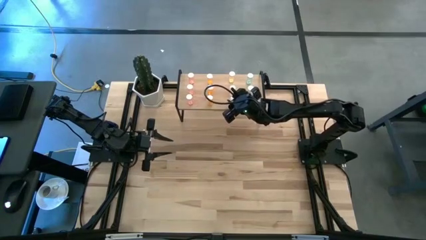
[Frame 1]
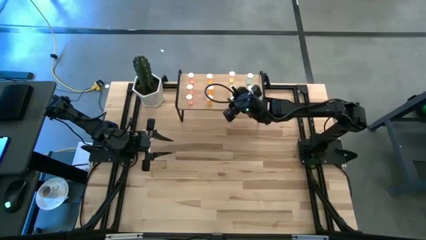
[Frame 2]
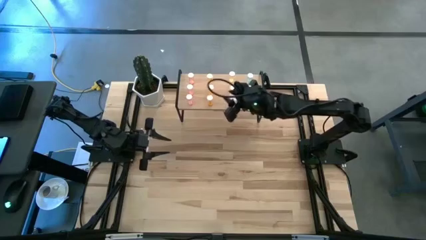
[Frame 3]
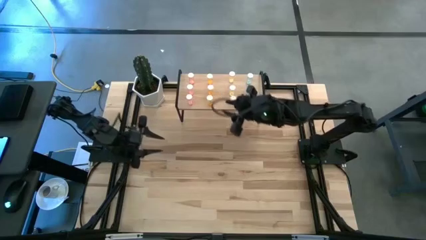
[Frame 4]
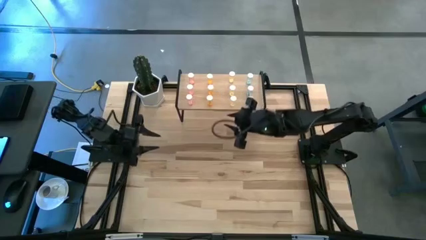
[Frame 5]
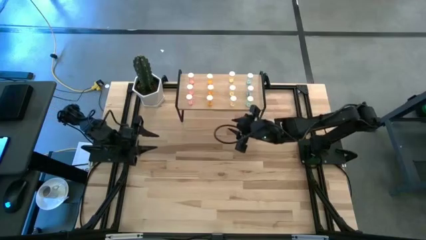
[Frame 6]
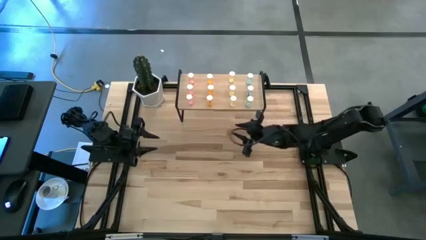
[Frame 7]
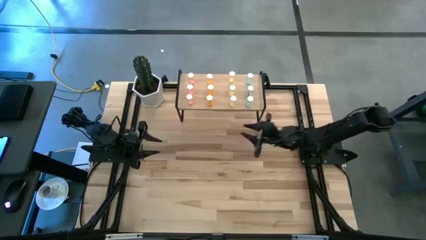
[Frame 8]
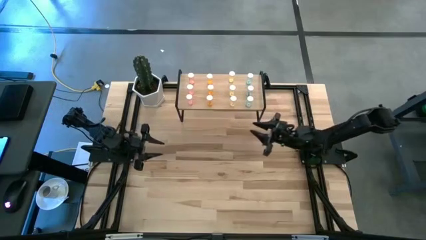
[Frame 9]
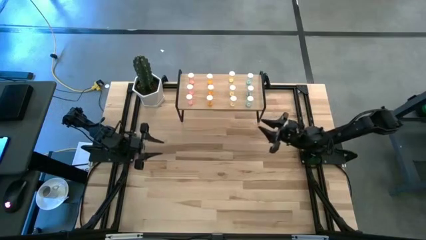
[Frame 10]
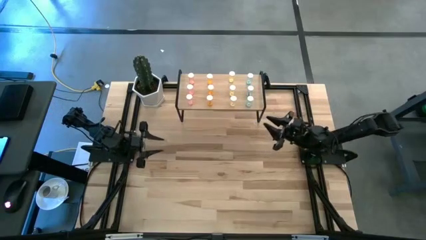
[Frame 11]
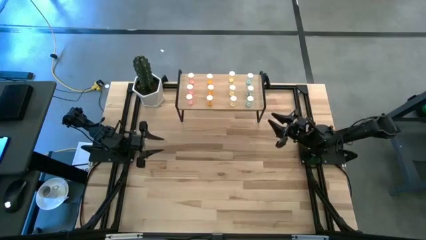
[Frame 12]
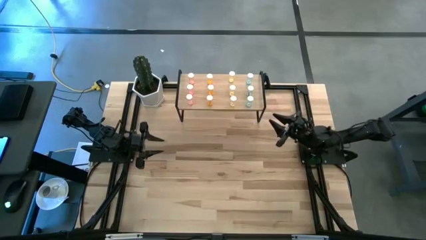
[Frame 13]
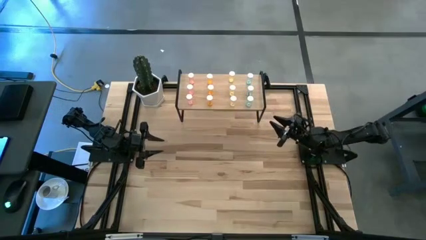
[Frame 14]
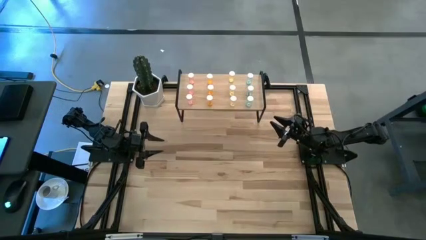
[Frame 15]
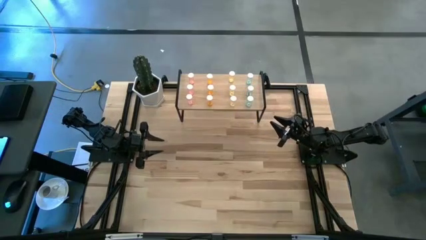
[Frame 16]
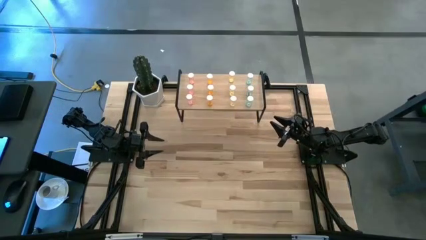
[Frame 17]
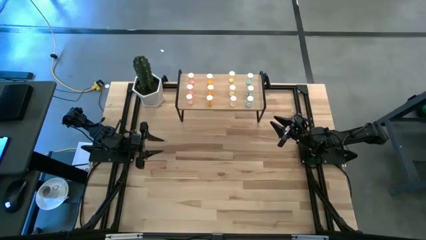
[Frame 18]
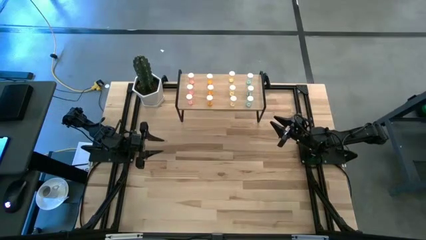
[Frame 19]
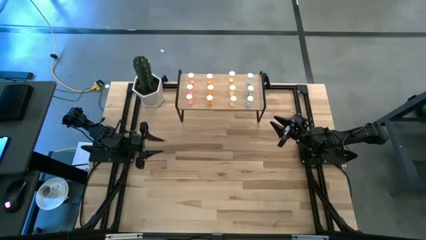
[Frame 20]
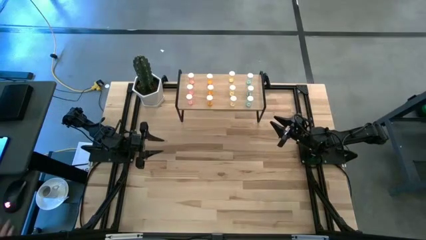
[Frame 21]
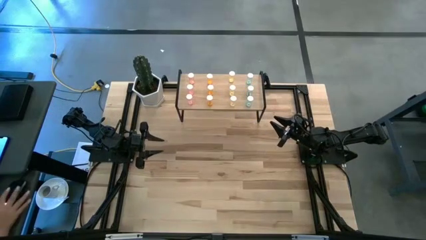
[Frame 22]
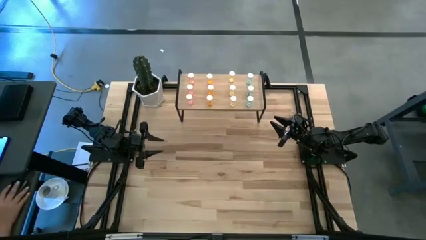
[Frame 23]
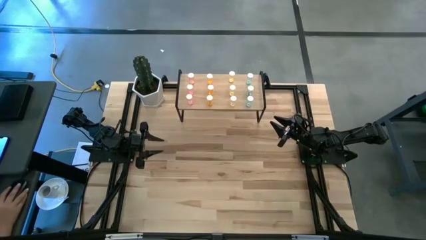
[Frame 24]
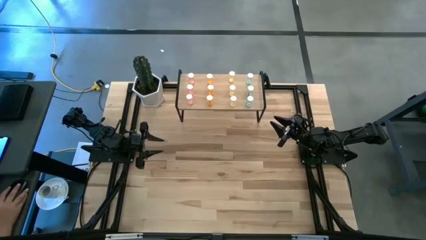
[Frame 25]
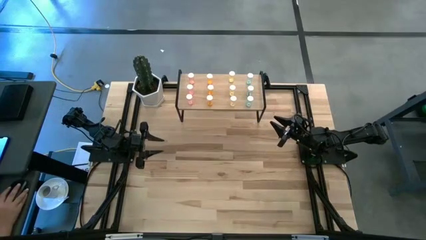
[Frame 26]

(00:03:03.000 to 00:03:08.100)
Task: Pick and place medicine bottles onto shelf by color
Return to Home Position

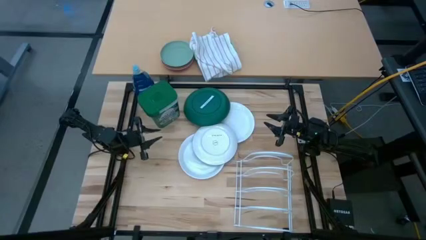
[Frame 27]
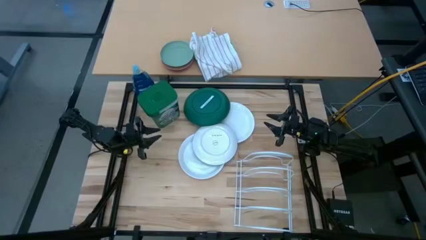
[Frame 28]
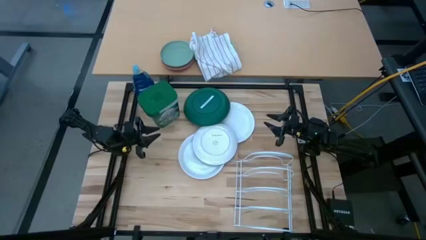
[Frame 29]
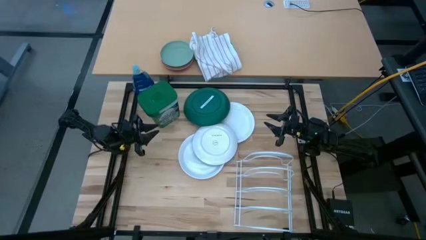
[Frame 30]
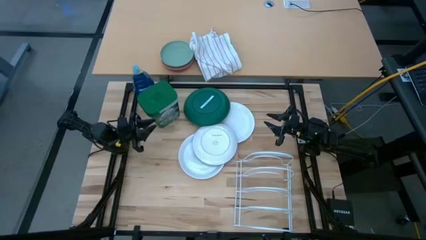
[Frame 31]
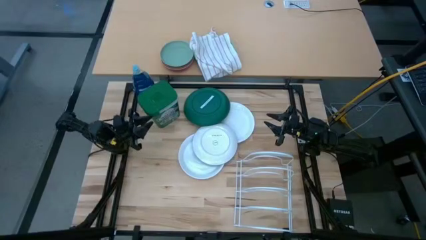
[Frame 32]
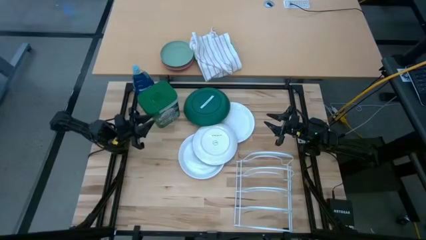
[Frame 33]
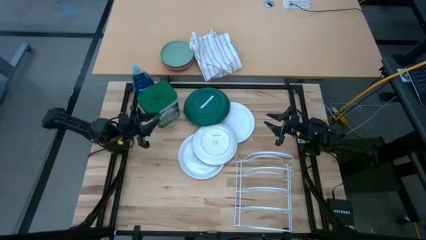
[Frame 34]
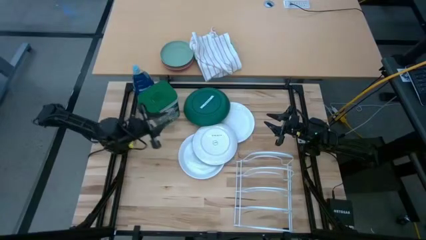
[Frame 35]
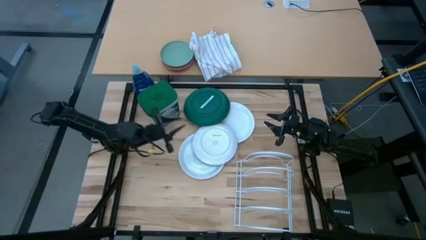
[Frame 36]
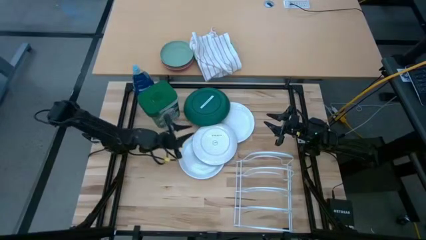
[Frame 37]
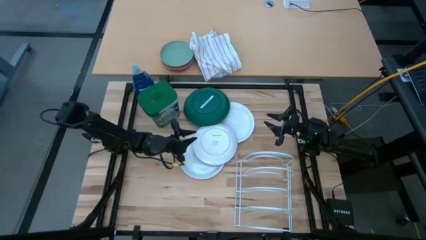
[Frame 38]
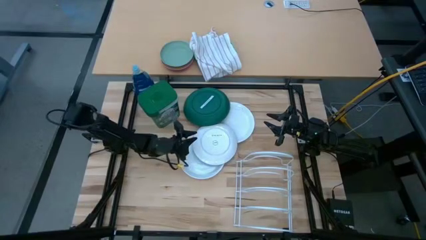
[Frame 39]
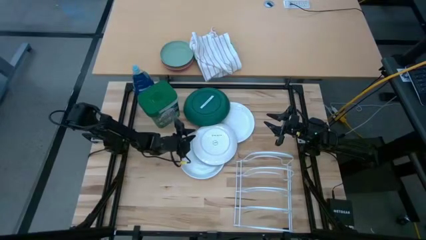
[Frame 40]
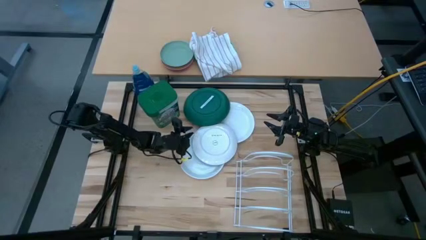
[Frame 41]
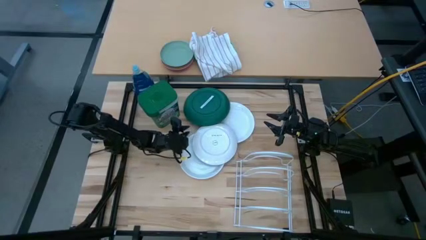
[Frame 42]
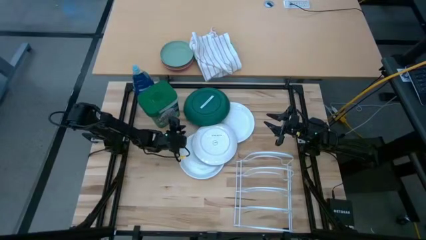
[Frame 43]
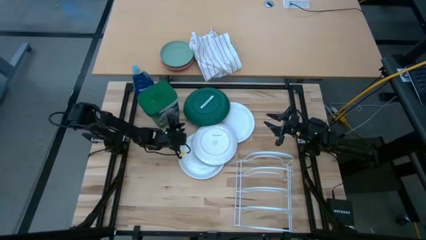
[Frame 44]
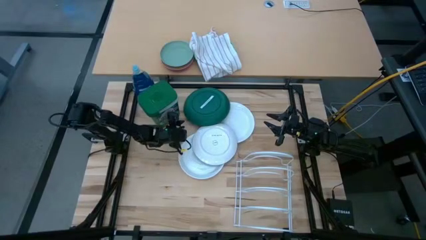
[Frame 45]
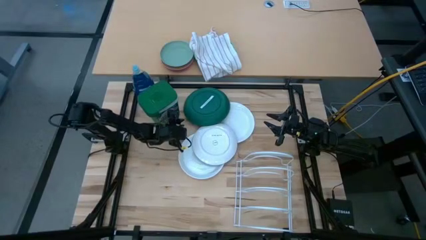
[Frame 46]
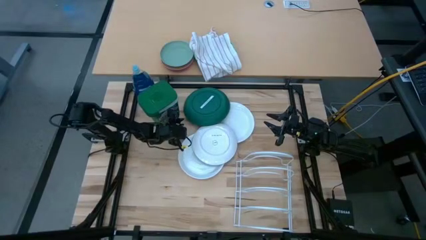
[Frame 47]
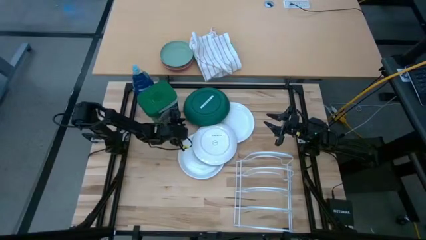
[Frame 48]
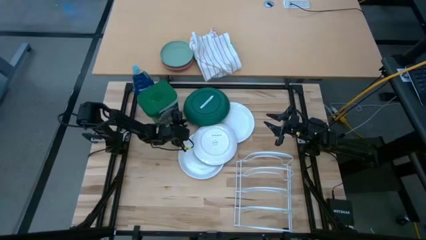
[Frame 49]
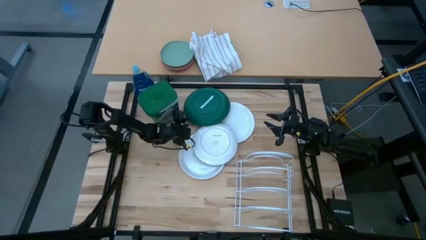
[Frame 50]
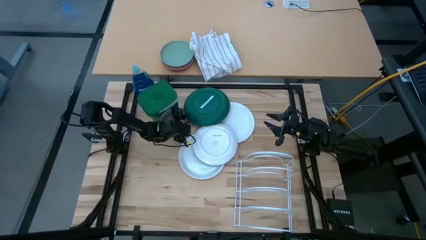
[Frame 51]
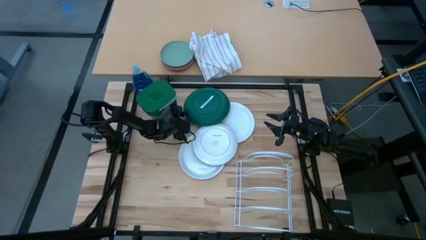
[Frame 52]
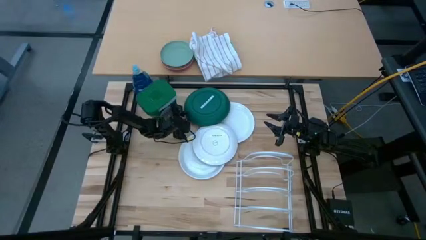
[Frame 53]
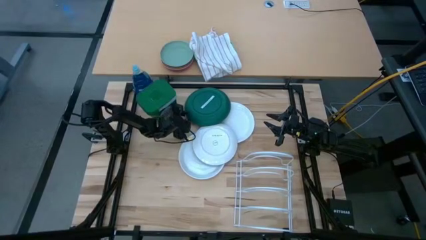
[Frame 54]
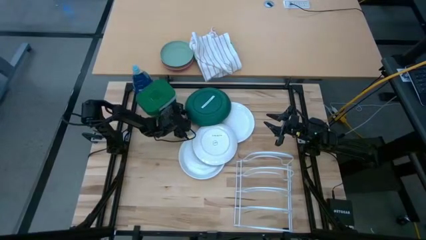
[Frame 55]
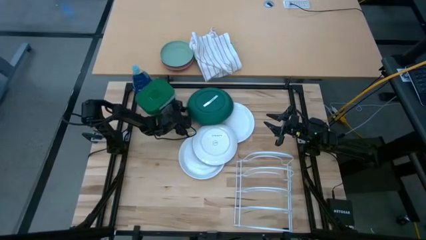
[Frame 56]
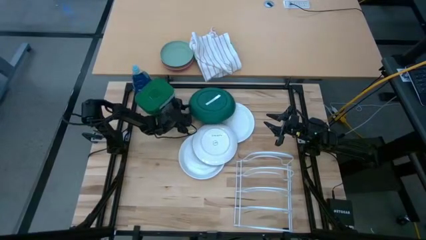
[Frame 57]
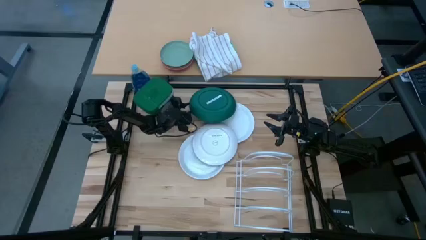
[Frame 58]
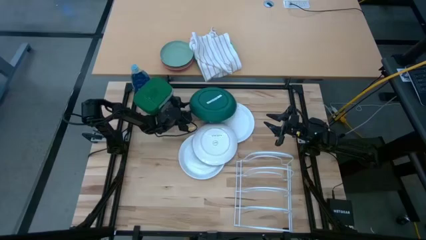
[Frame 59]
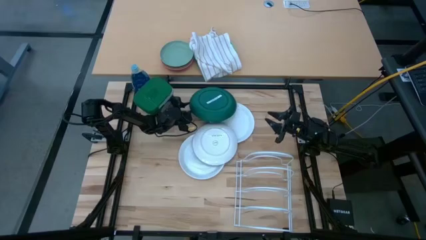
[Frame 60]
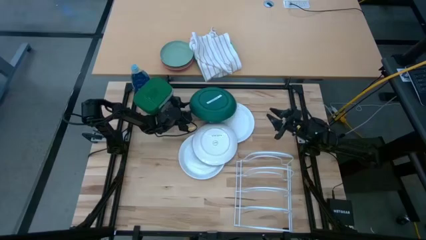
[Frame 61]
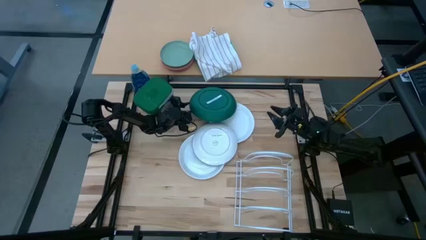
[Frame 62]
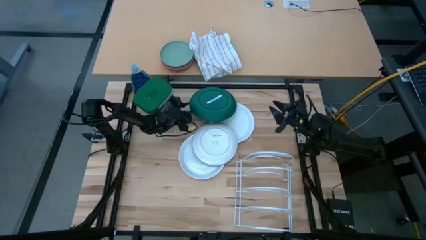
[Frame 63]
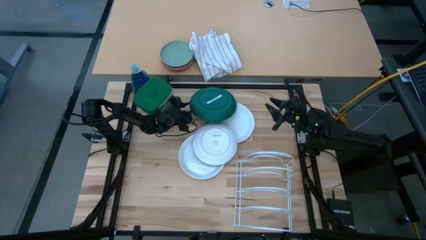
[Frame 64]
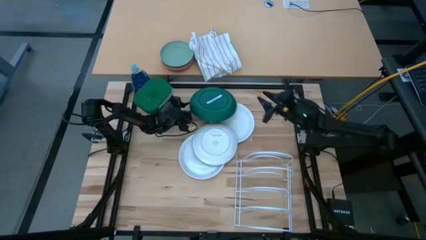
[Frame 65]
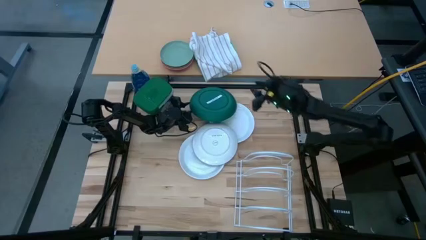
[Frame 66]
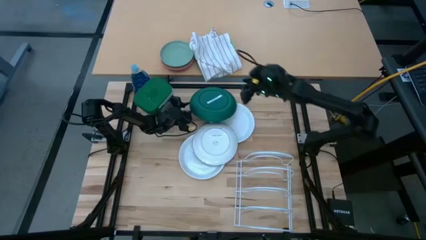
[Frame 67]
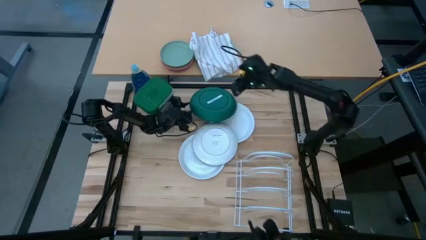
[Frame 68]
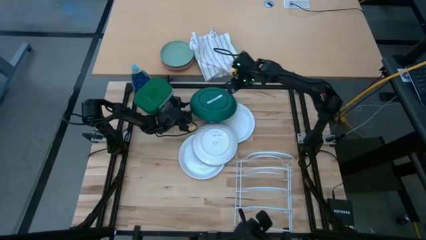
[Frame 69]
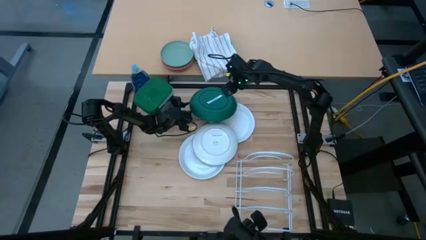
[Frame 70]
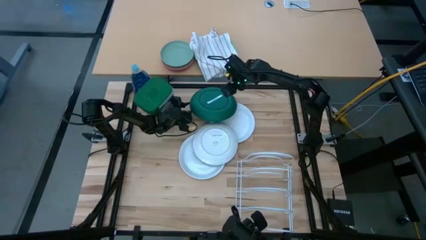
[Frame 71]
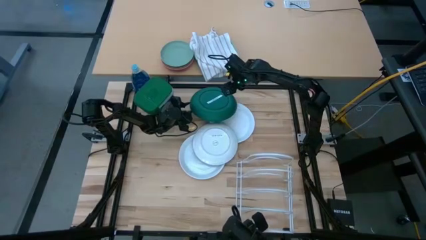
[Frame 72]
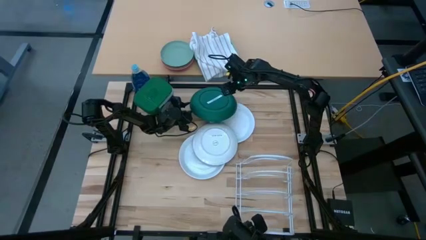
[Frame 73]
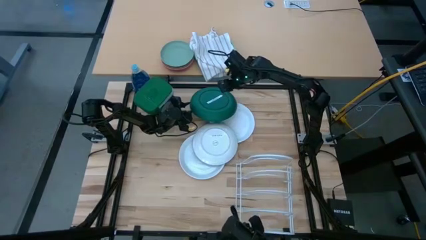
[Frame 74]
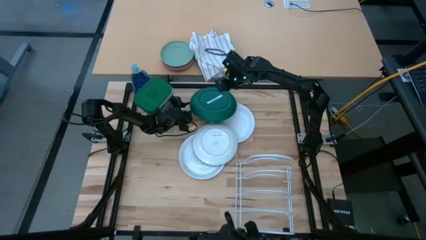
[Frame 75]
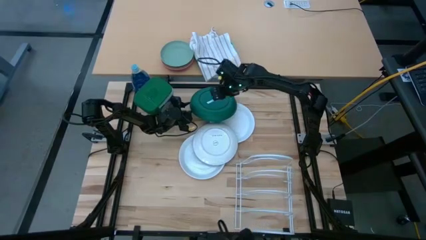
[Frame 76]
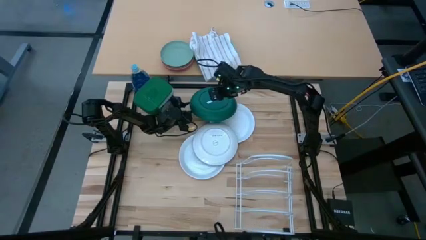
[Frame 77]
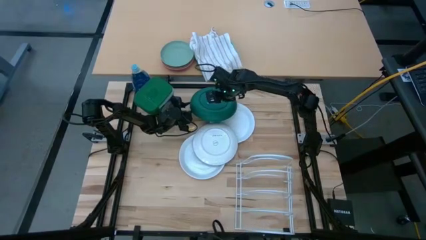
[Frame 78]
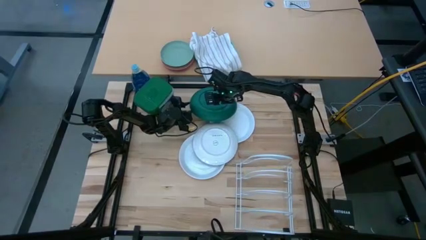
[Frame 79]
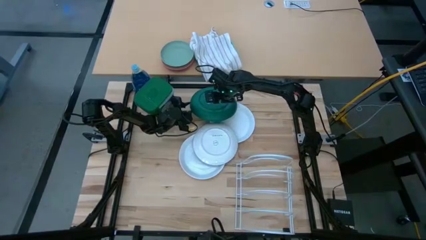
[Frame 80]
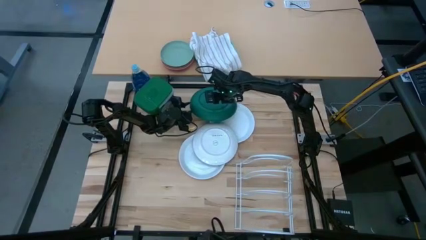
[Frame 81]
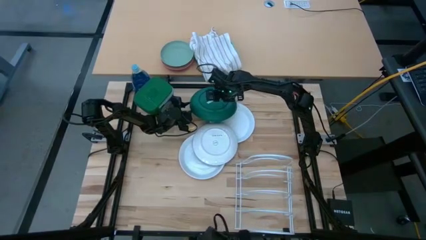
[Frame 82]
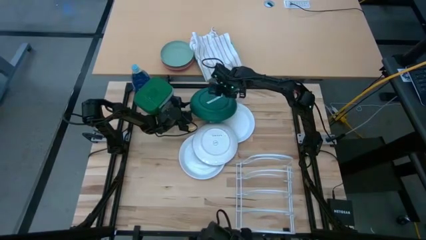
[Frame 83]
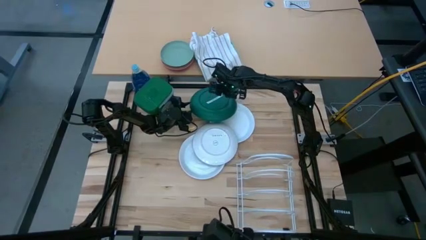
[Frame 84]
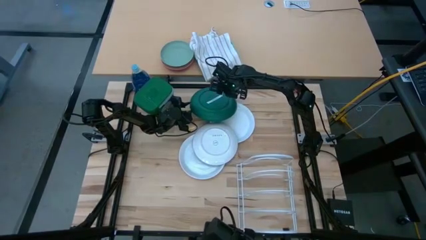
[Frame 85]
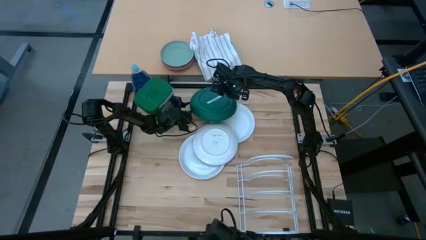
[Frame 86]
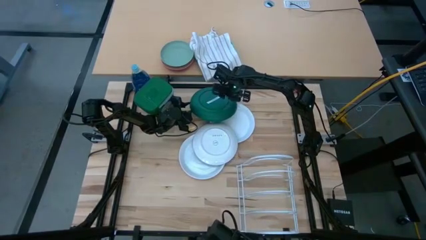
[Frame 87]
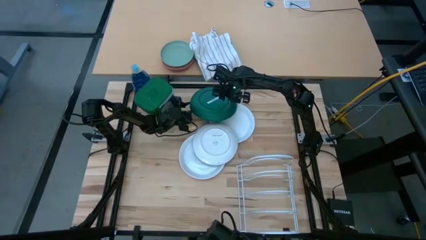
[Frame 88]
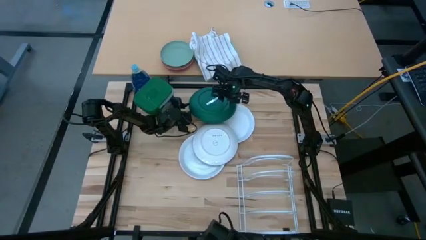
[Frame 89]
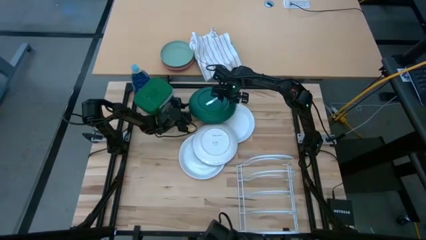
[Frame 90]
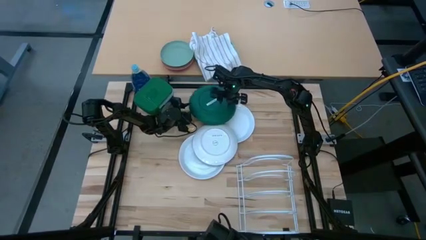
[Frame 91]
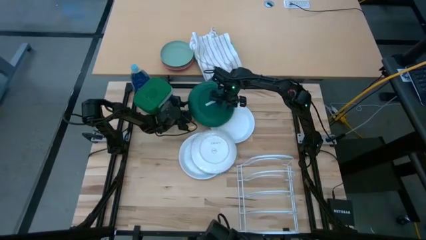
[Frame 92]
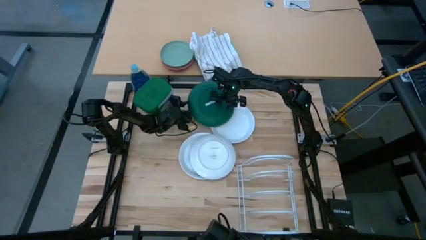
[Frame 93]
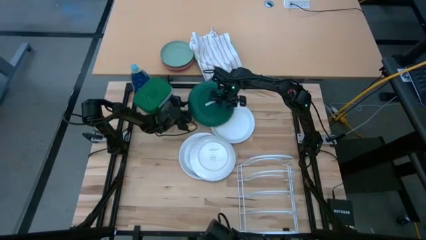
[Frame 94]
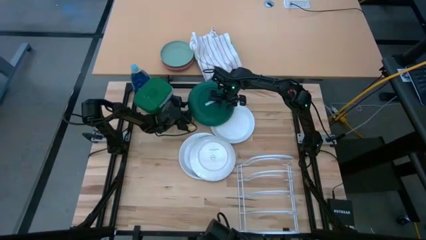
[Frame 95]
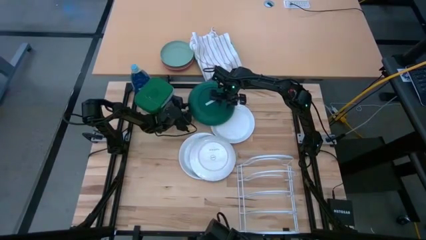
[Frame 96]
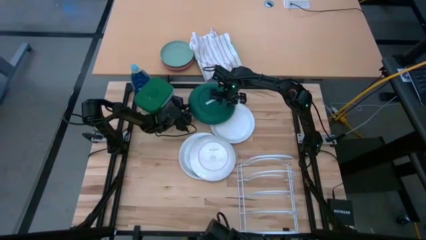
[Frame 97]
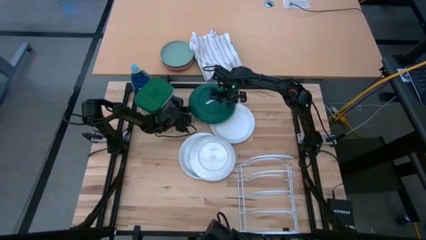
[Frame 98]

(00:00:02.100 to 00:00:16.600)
Task: Sort dishes
Put the green plate on the dish rack
